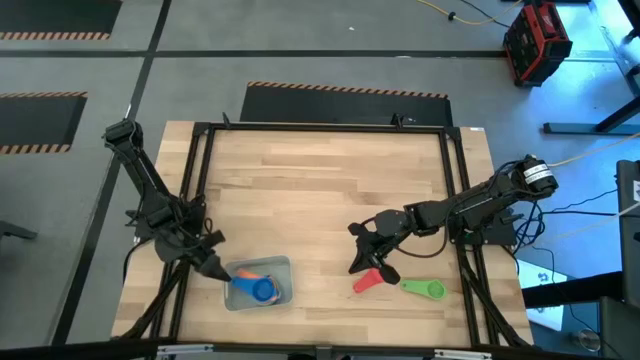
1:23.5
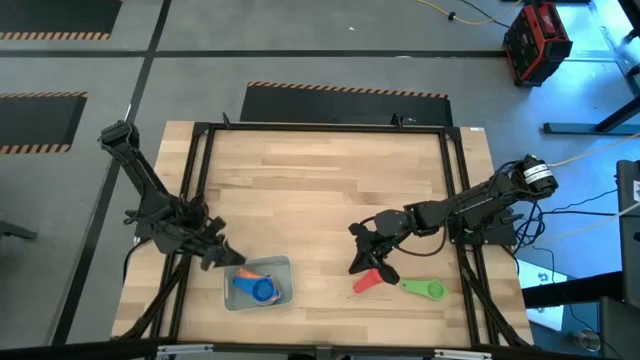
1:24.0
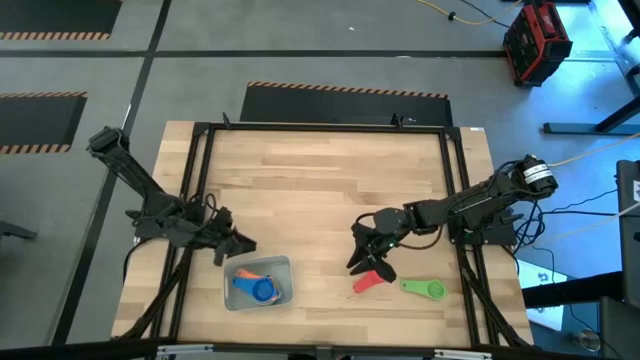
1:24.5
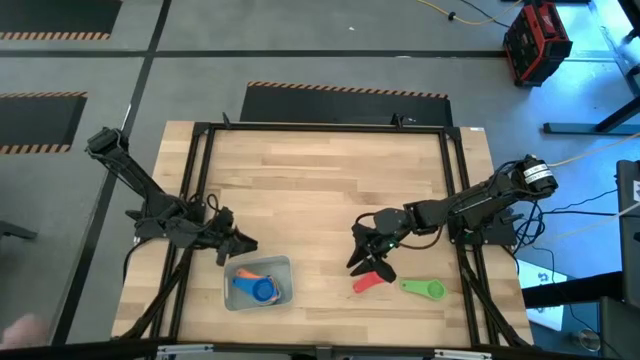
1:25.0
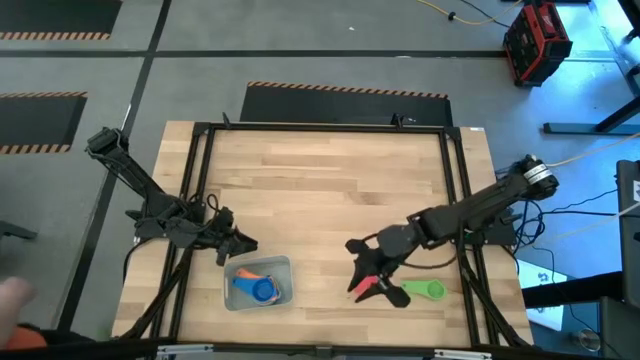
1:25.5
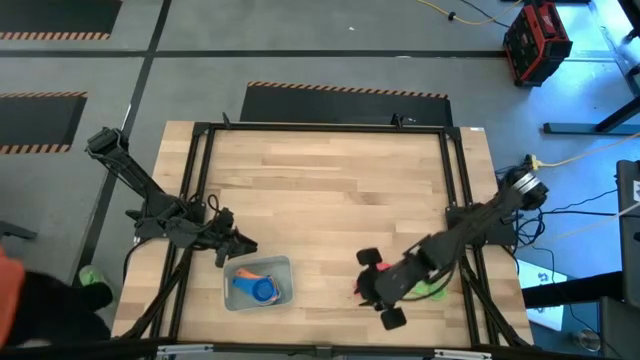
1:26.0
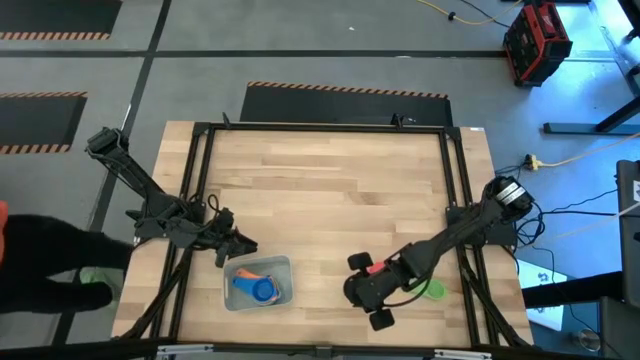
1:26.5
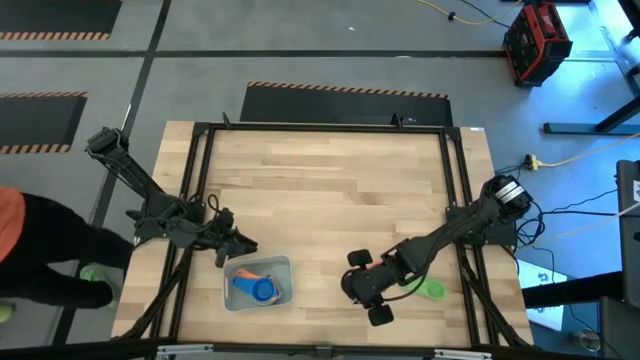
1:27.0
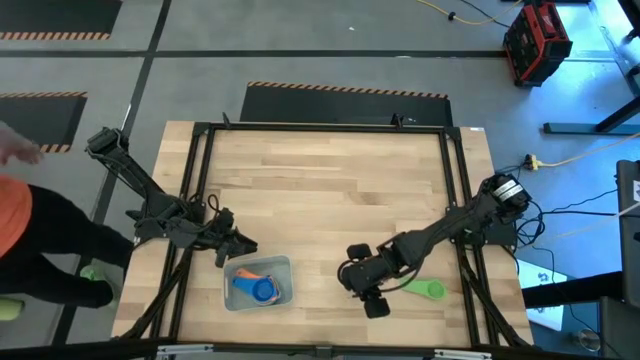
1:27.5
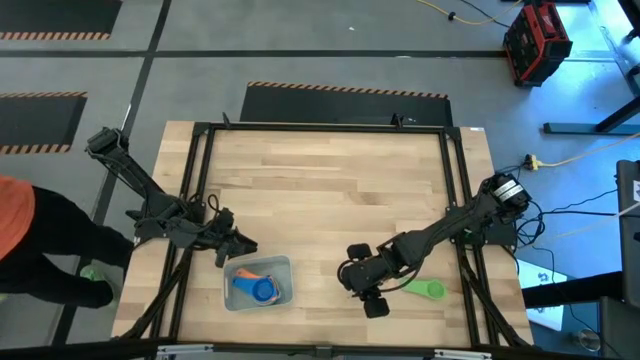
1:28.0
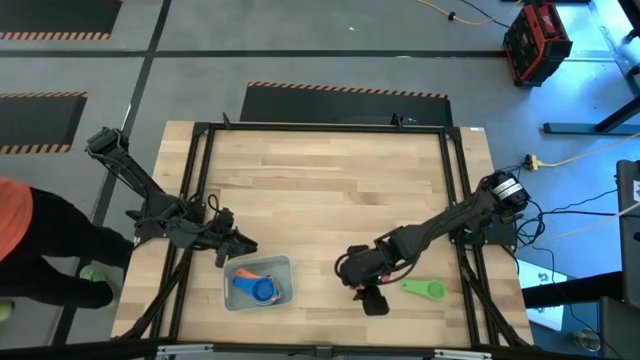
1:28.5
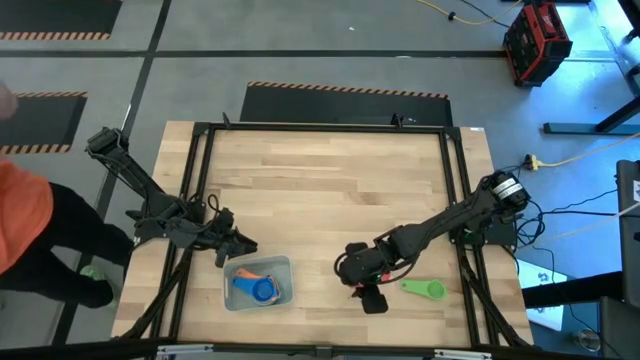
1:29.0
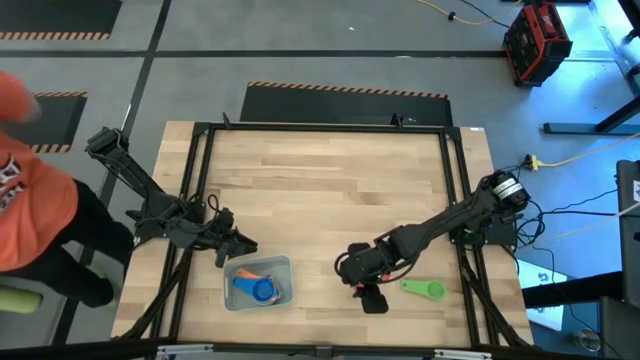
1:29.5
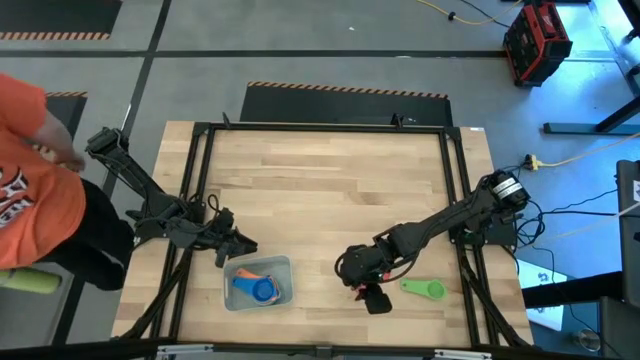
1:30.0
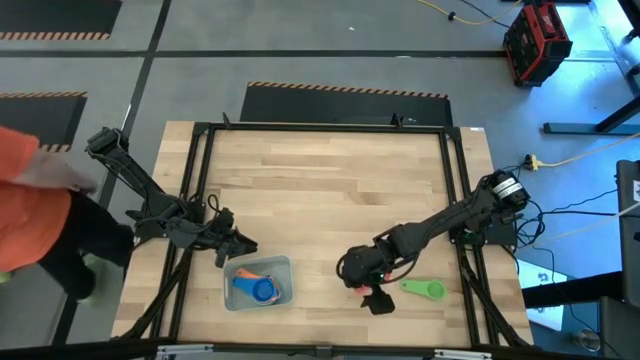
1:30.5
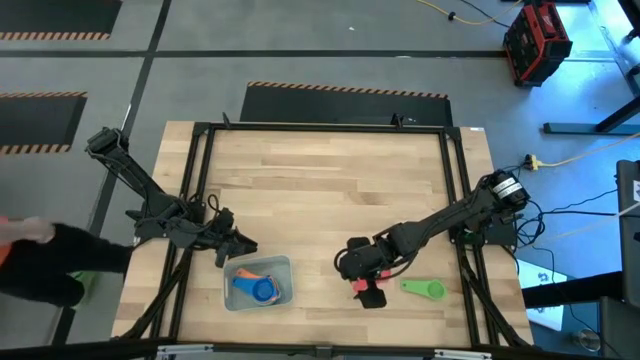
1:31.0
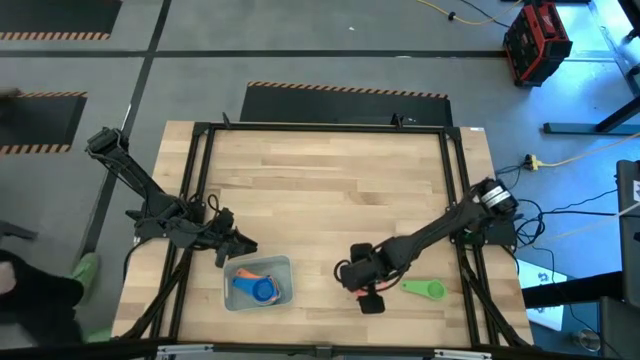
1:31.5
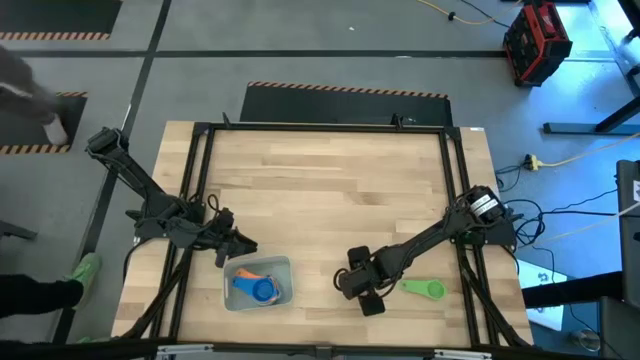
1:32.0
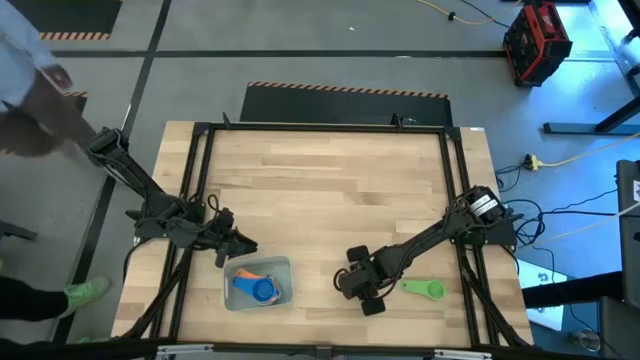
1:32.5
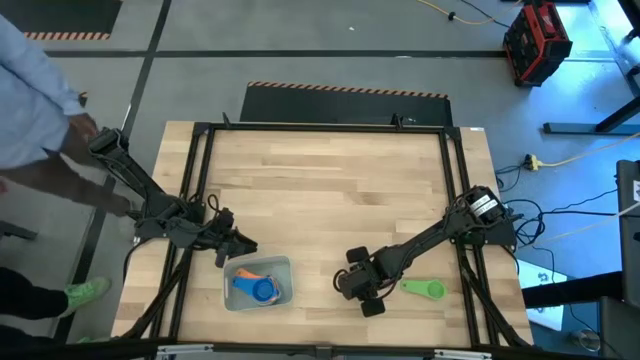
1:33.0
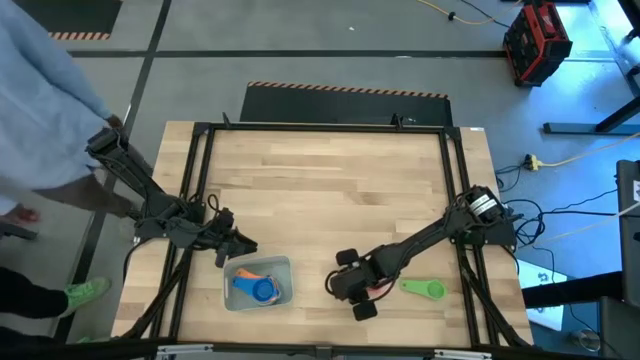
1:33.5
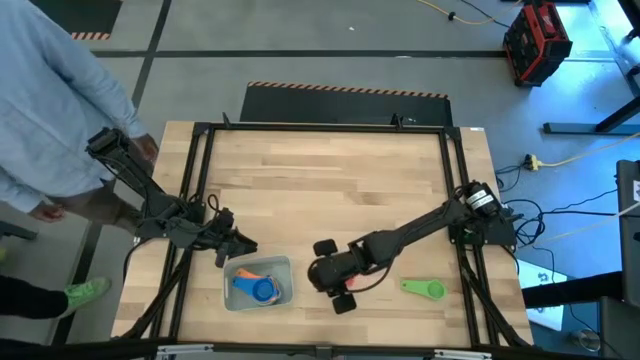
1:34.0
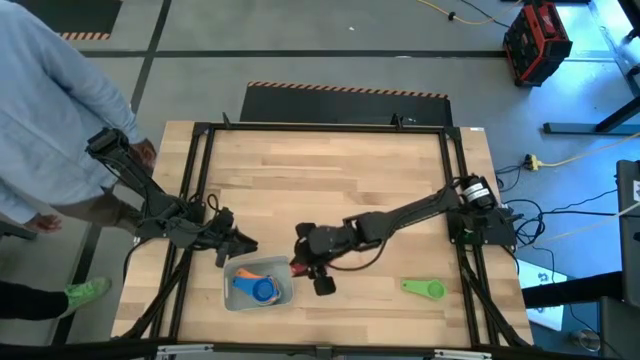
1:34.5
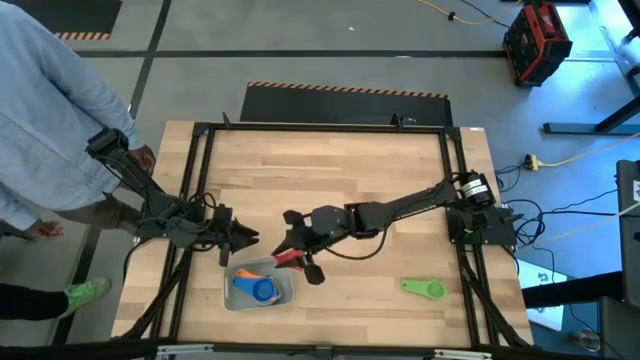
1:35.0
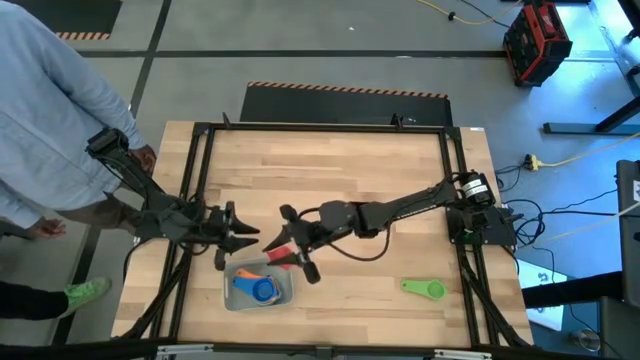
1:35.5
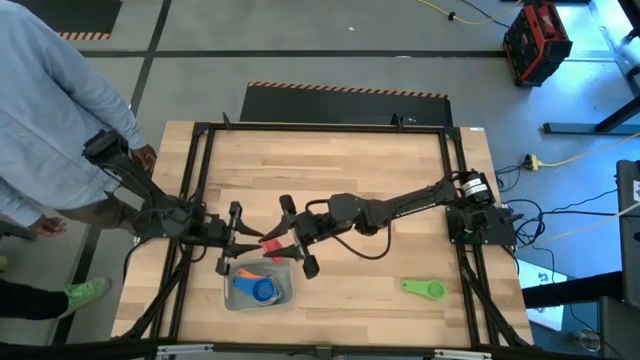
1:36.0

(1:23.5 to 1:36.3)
Task: Nest measuring cups in basket
Stack the pink measuring cup on top of the blue measuring cup in the gray bin

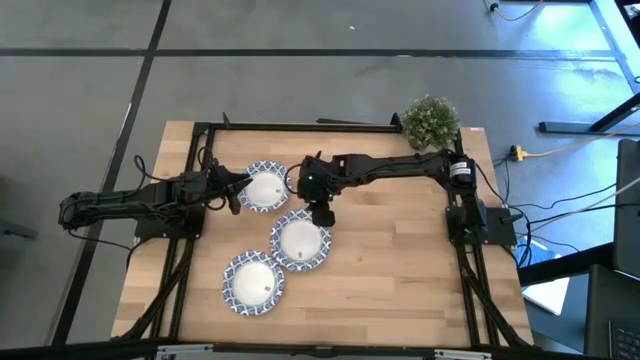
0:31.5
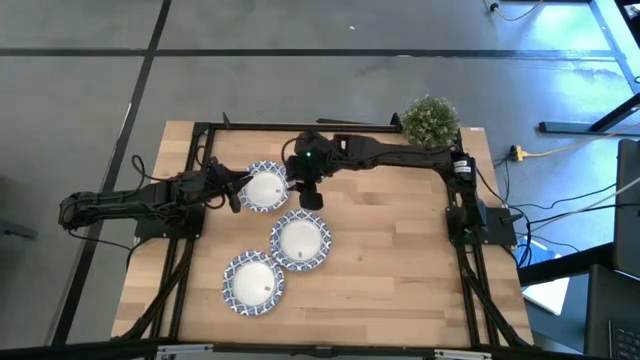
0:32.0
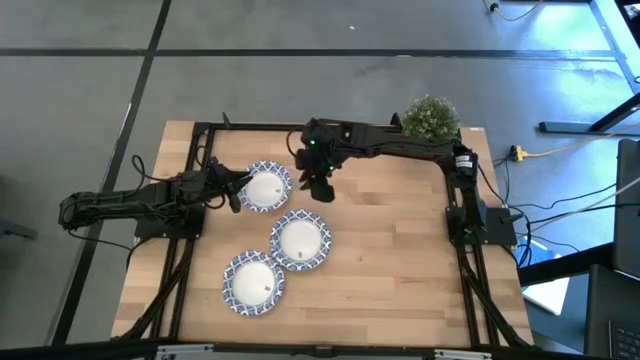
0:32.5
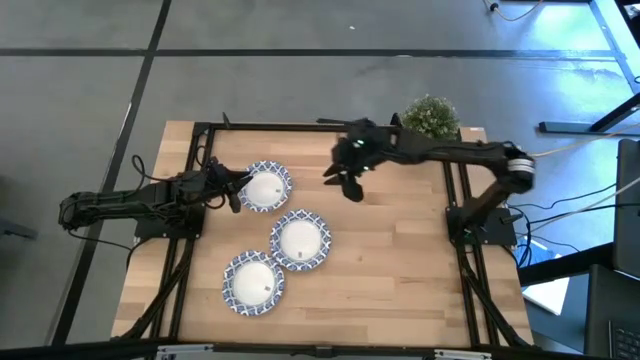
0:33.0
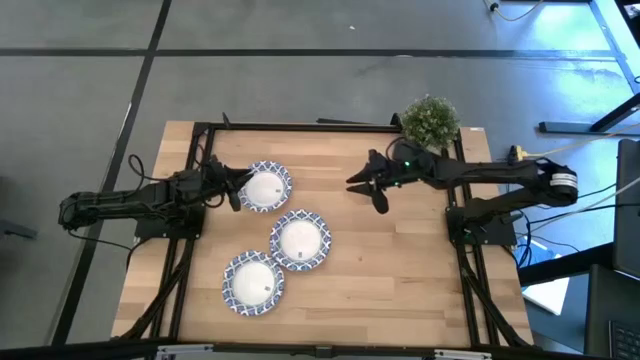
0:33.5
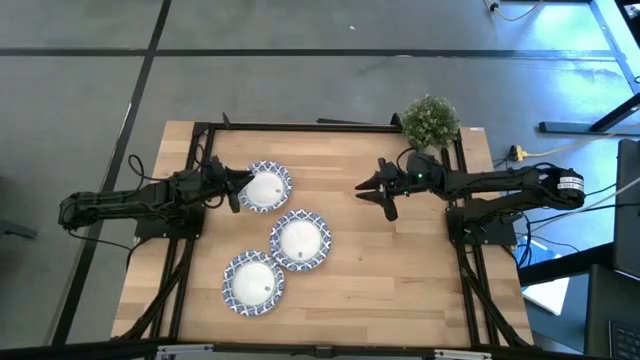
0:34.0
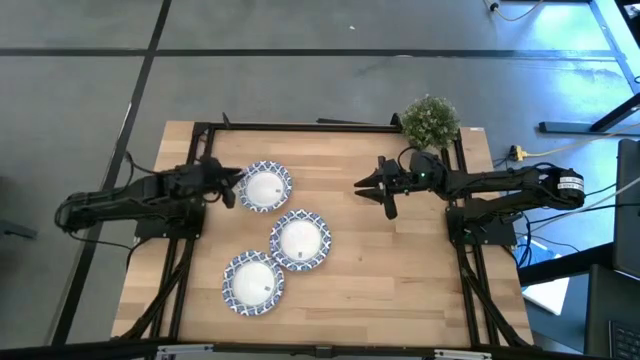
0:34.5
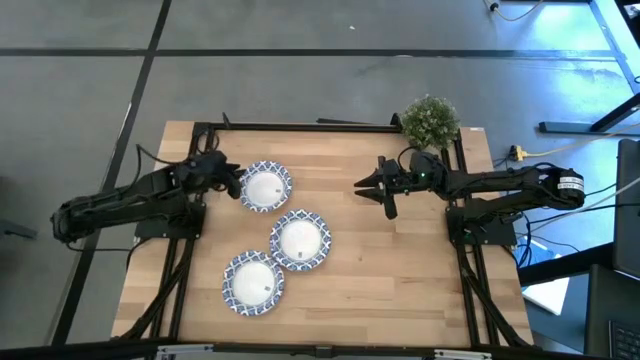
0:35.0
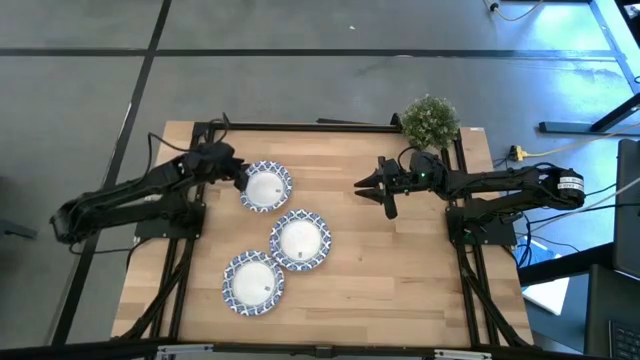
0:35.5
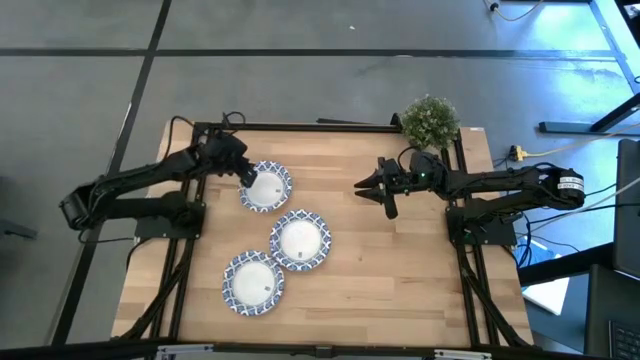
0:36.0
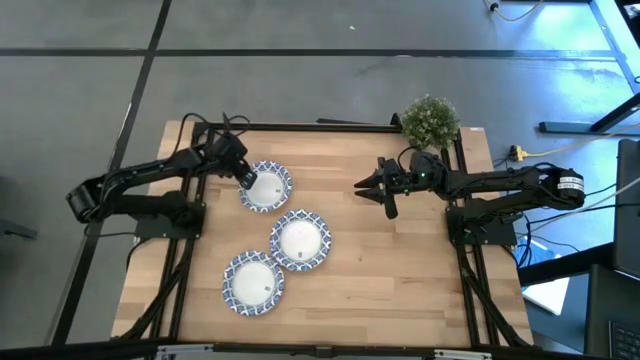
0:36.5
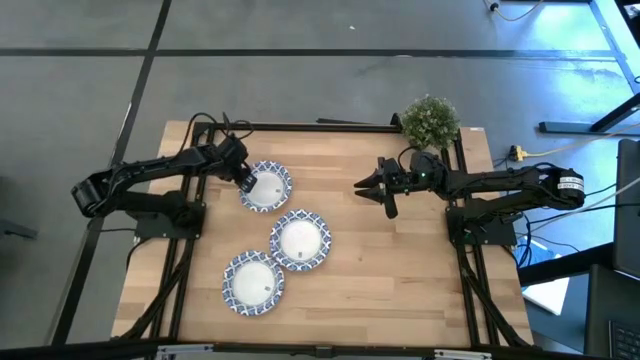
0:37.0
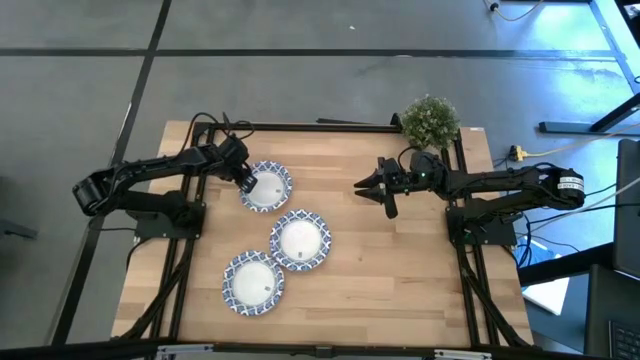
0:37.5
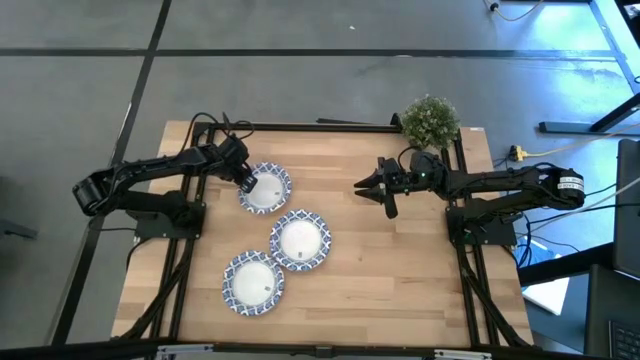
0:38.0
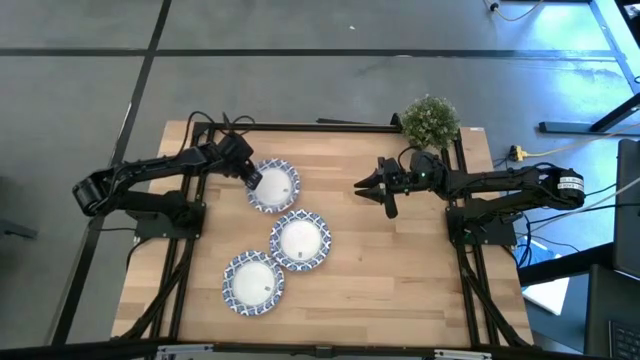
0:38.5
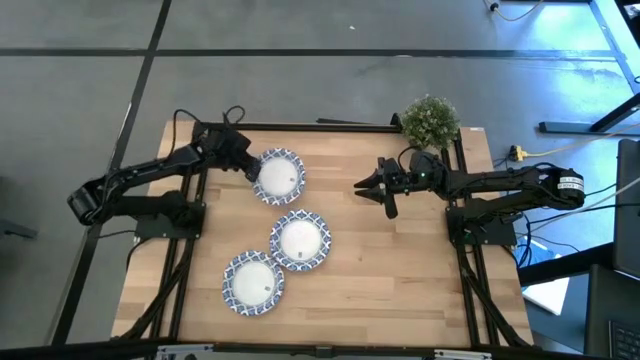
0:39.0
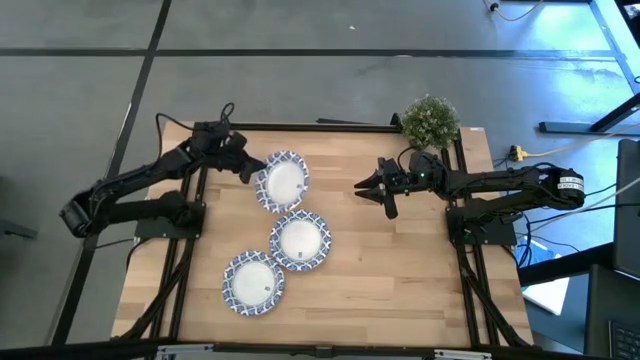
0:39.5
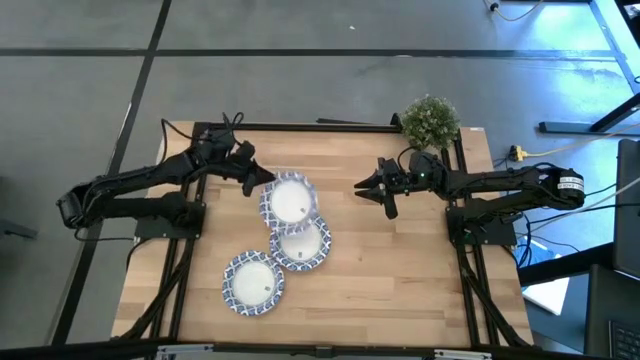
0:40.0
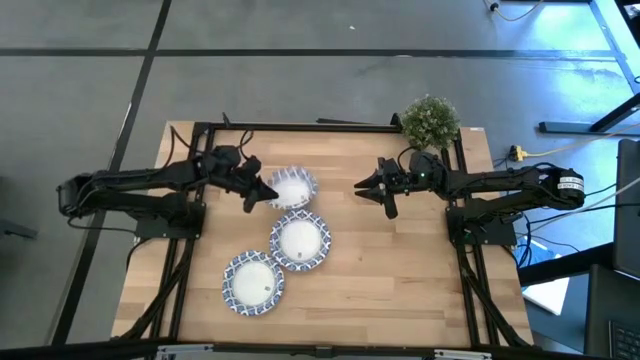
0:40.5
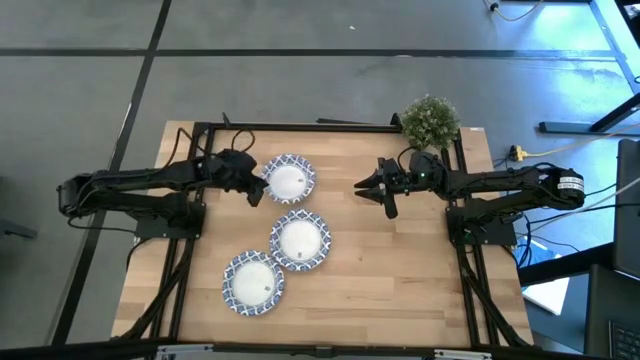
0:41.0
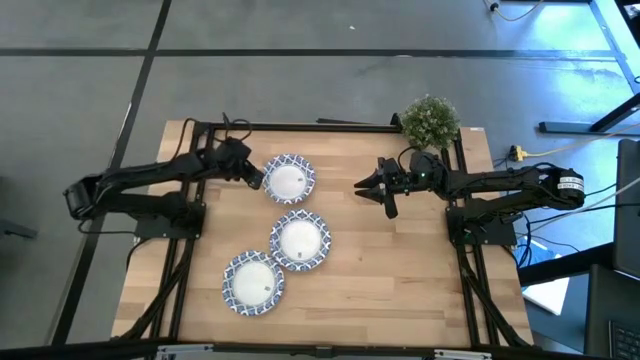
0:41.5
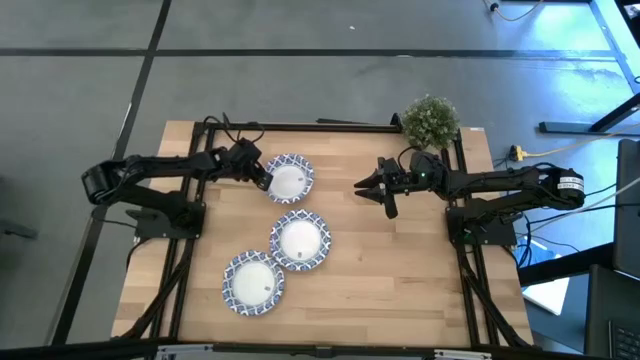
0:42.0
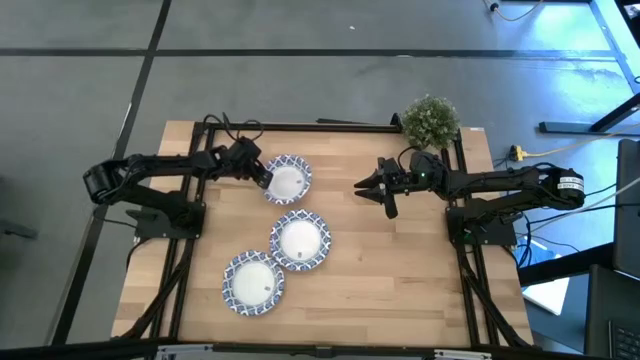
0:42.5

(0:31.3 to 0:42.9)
Task: Nest bowls inside each other
Stack the white patterned bowl on top of the other white patterned bowls
